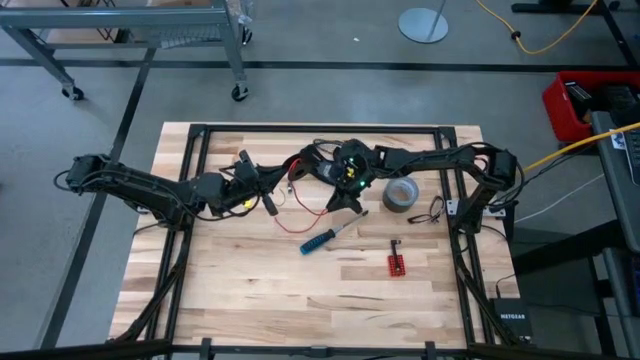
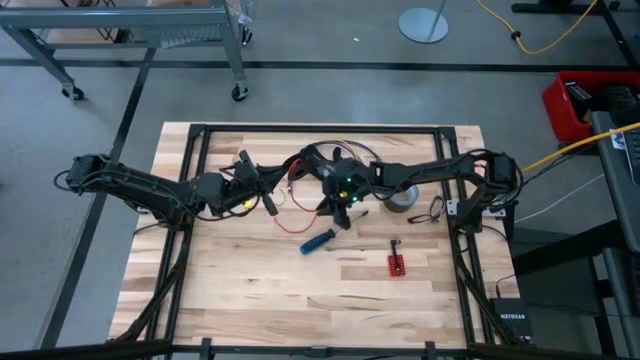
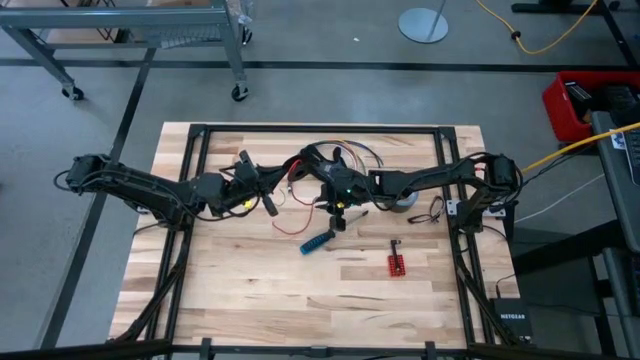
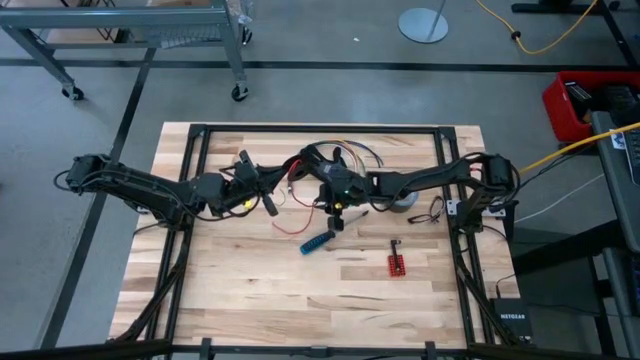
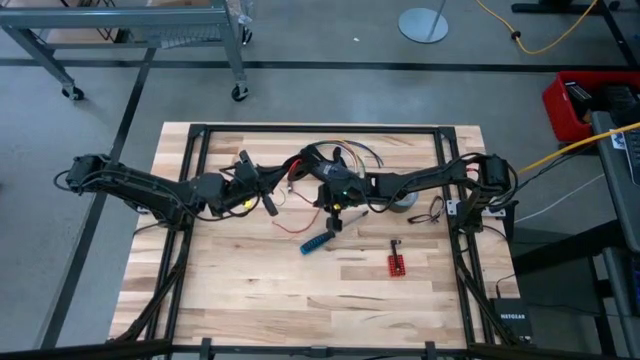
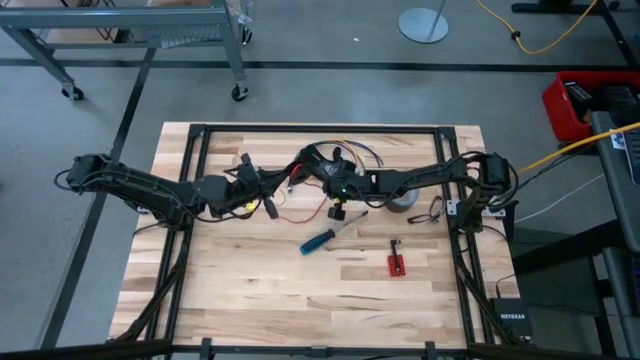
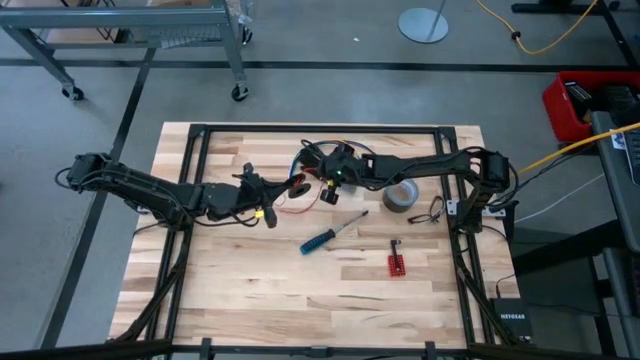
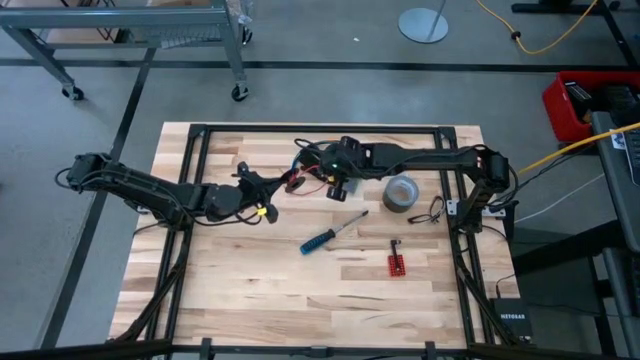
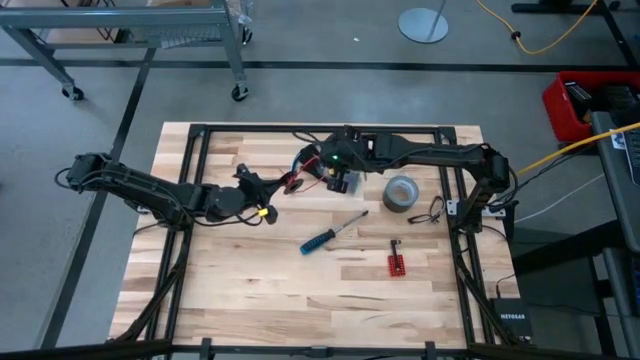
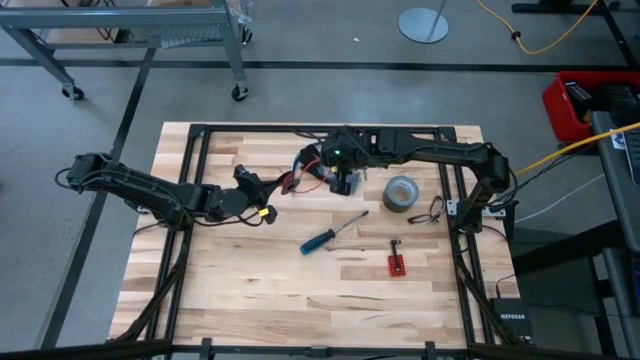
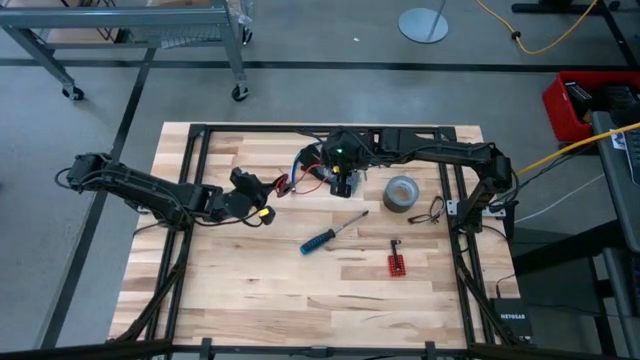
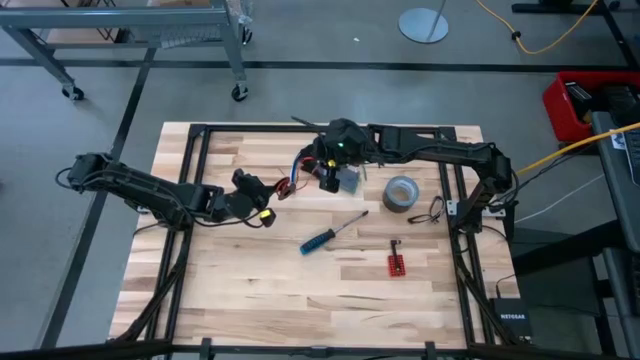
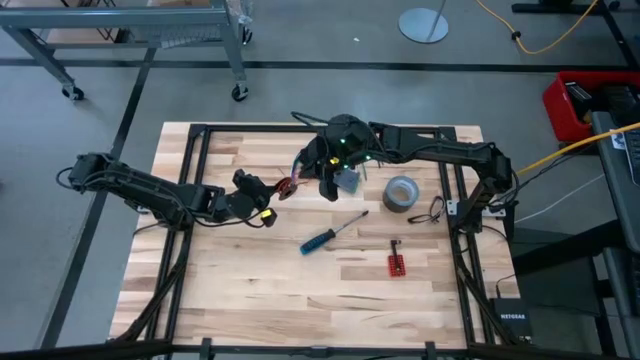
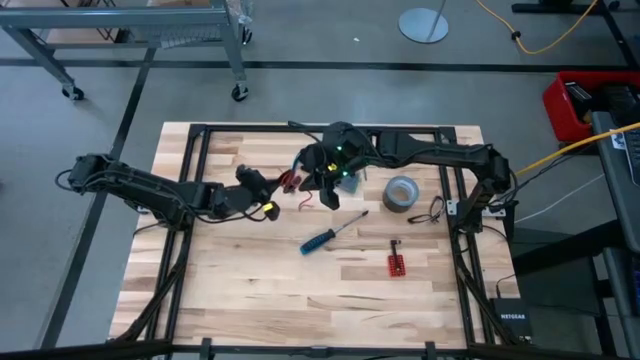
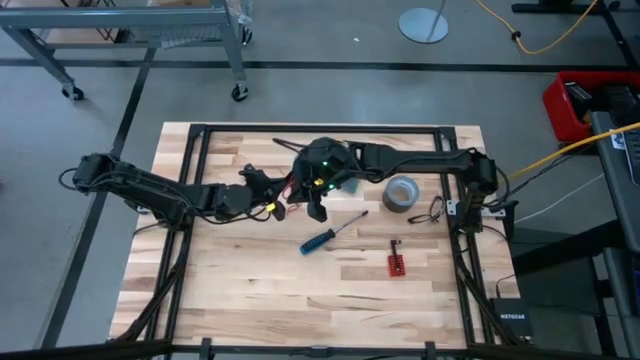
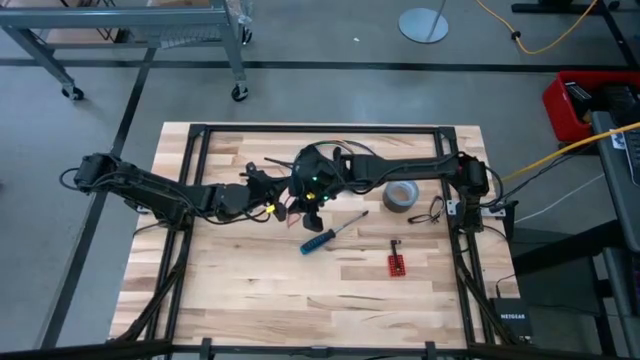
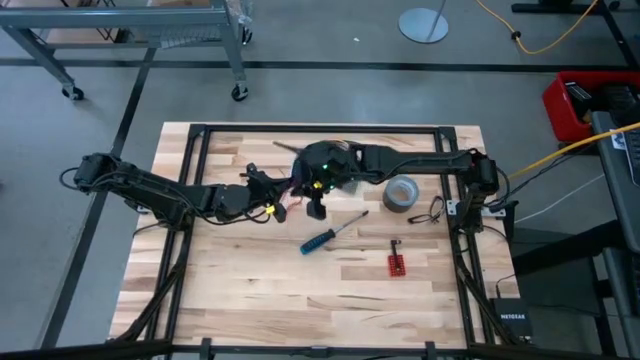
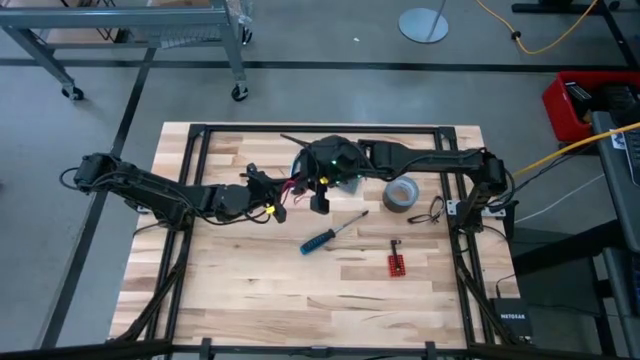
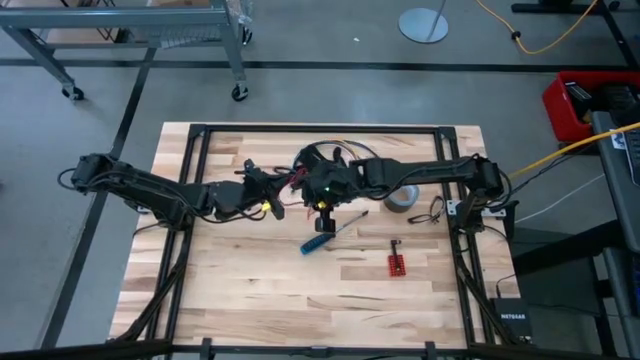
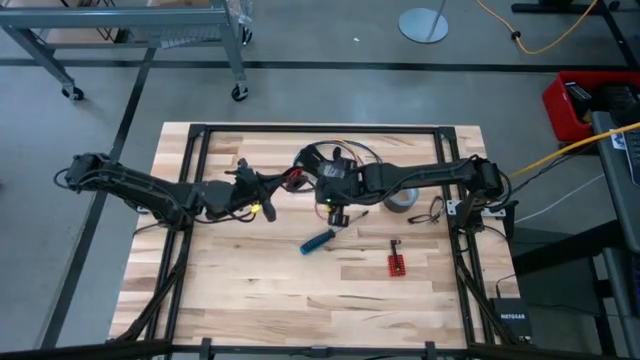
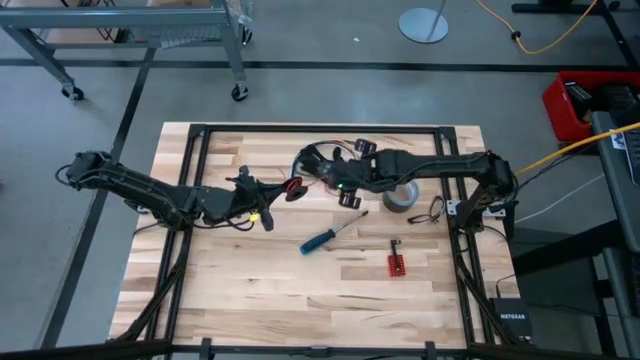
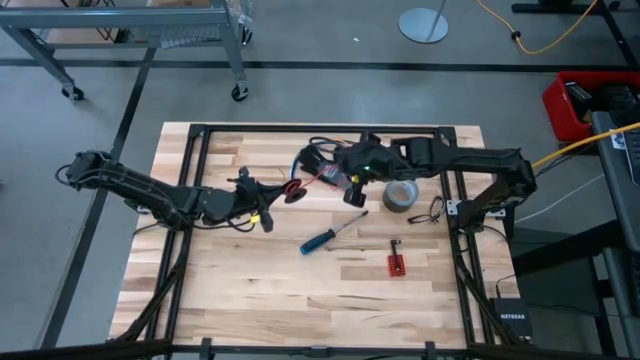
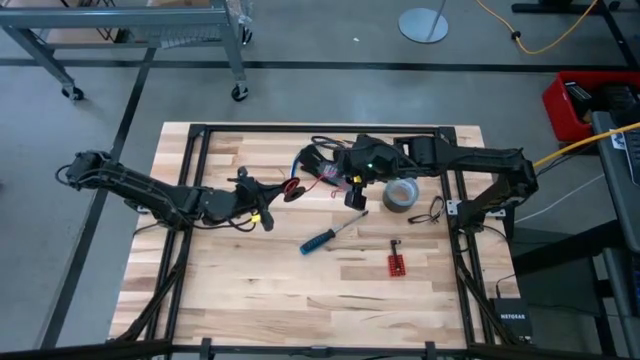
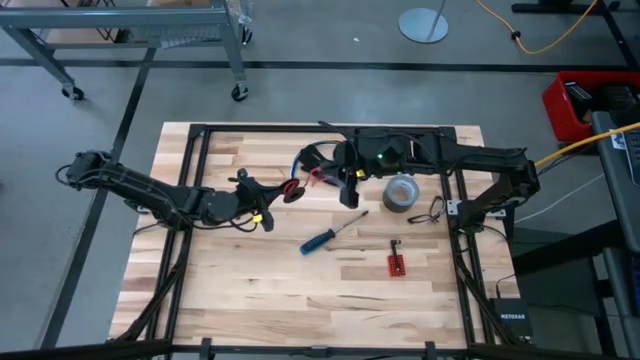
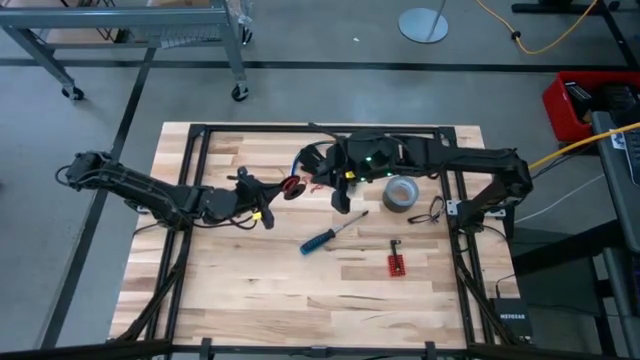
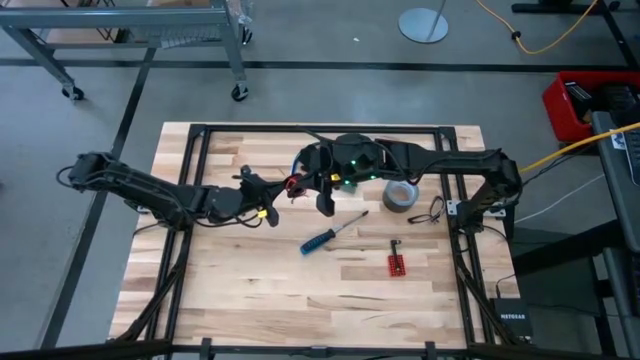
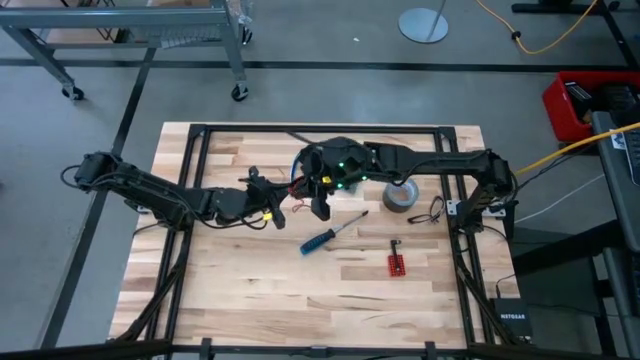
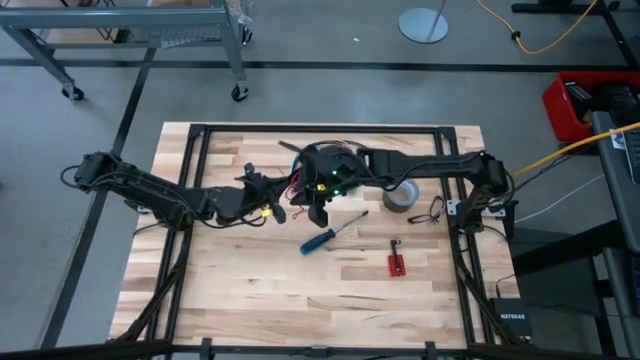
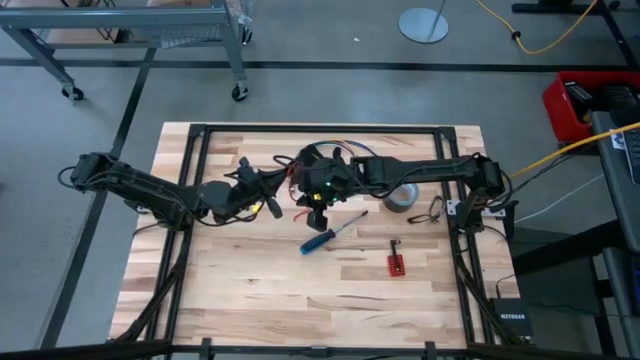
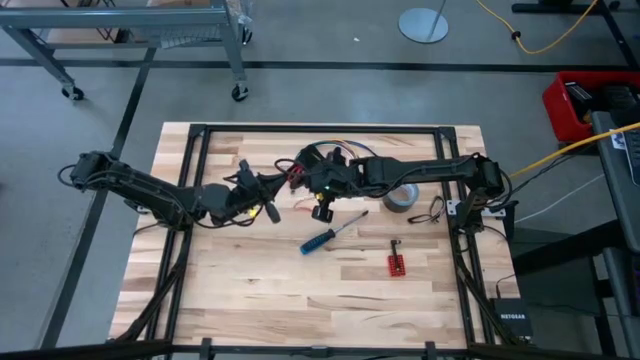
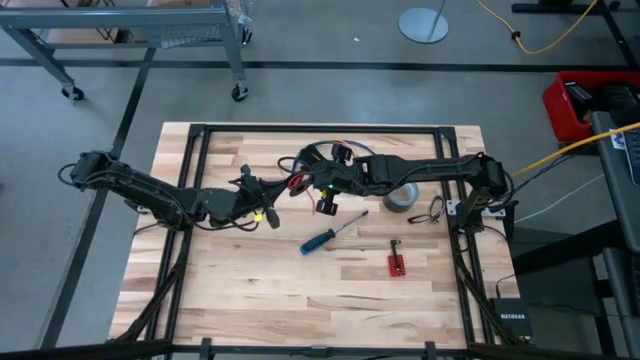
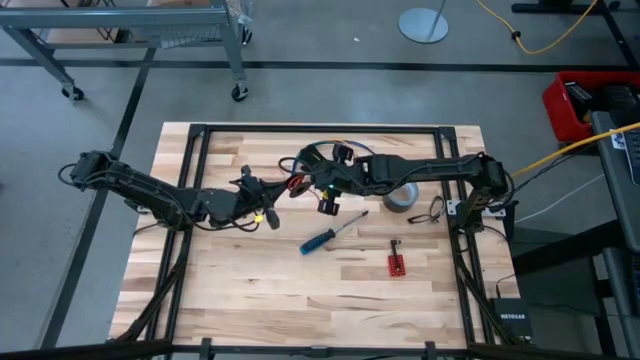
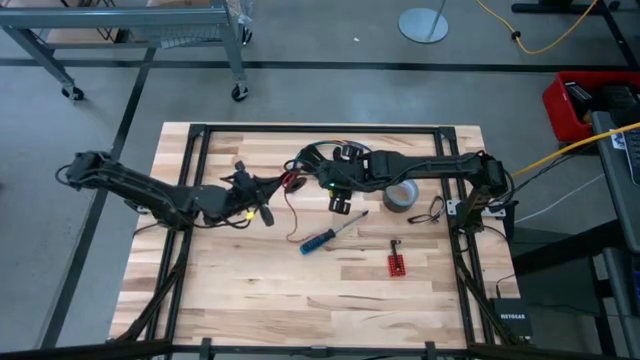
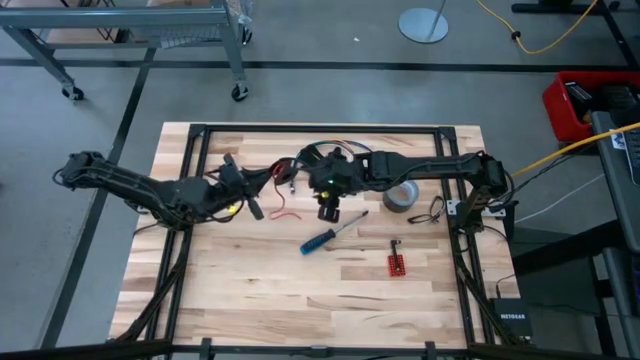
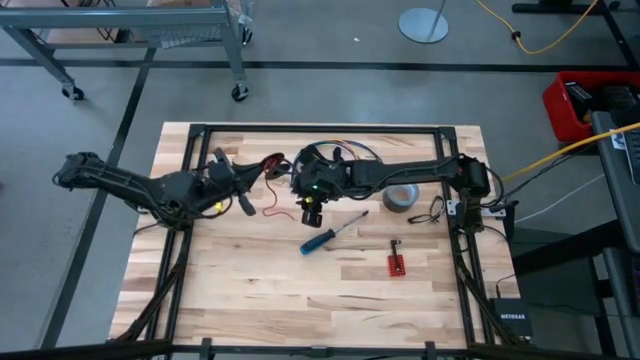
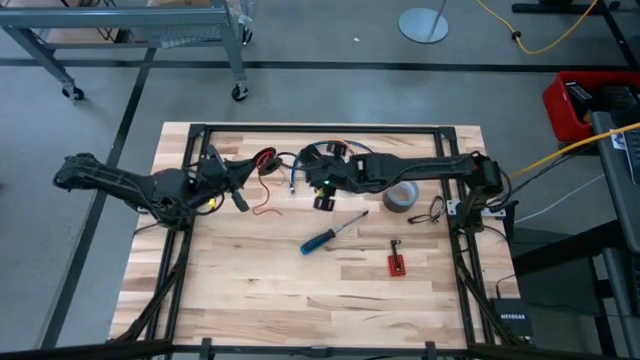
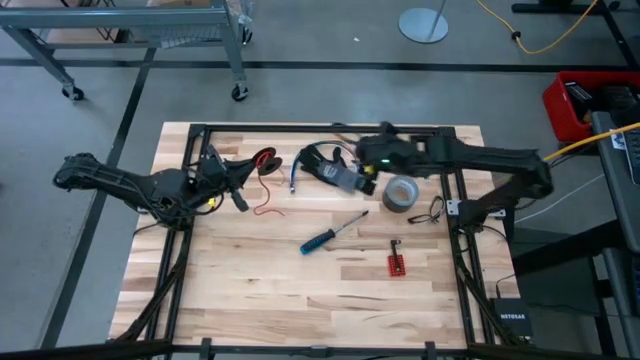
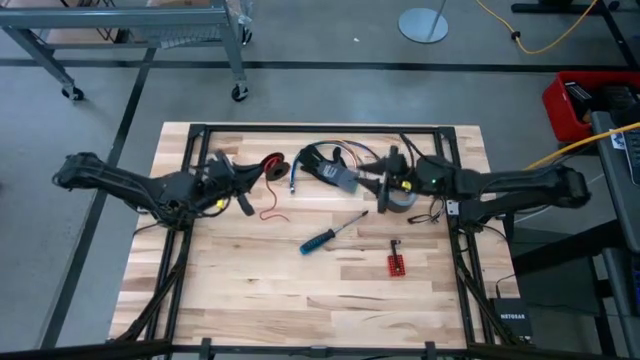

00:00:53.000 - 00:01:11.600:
Task: Coil cords
Coil the red wire onto the spool

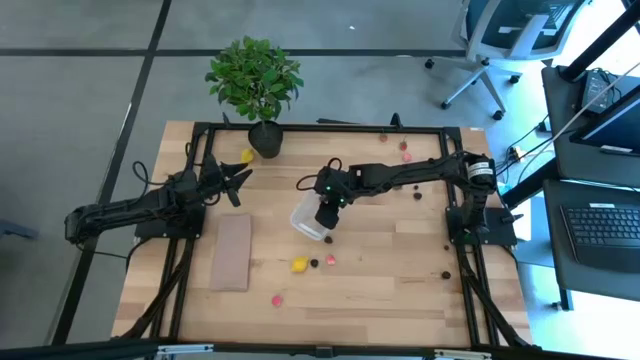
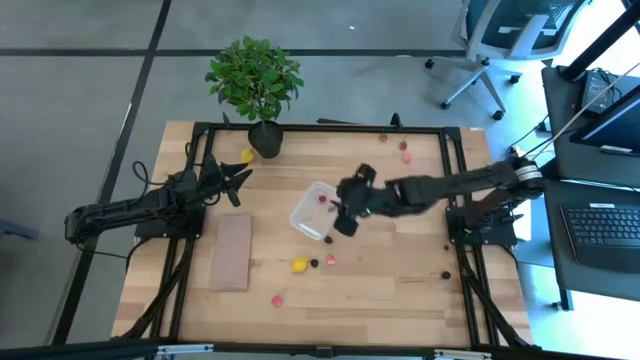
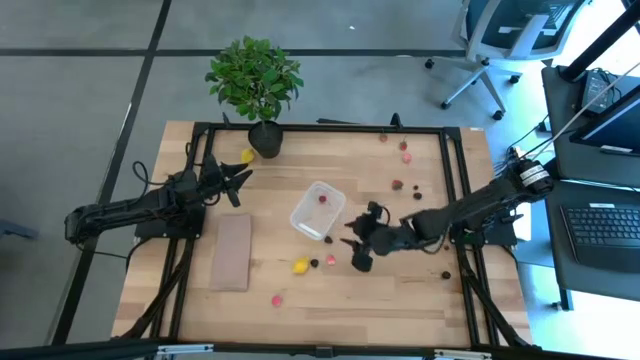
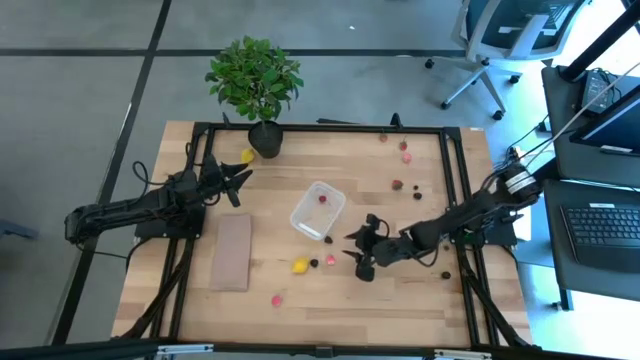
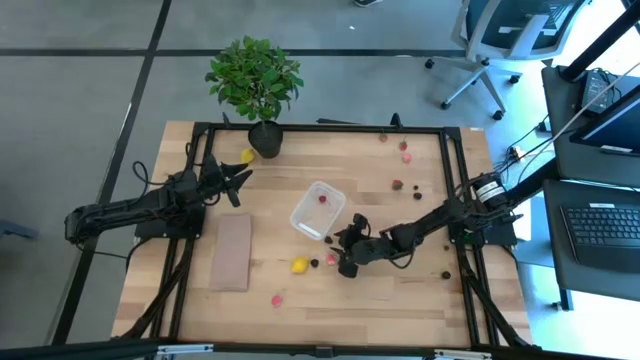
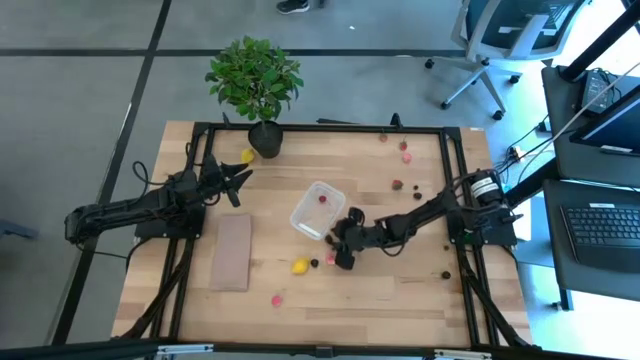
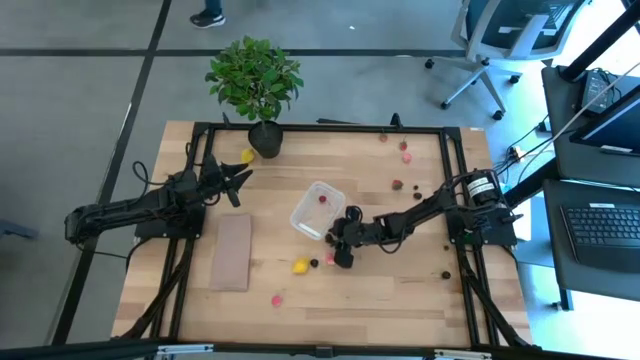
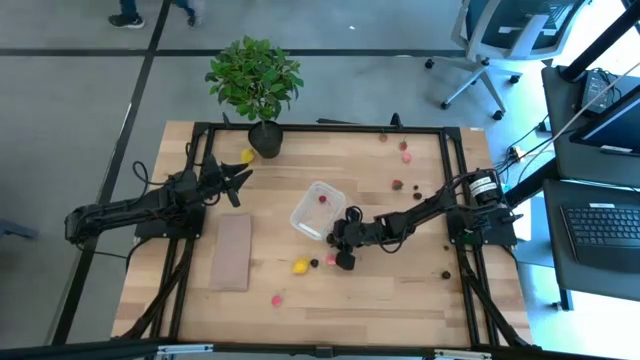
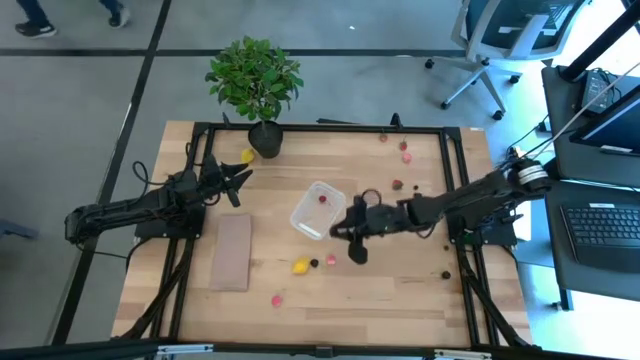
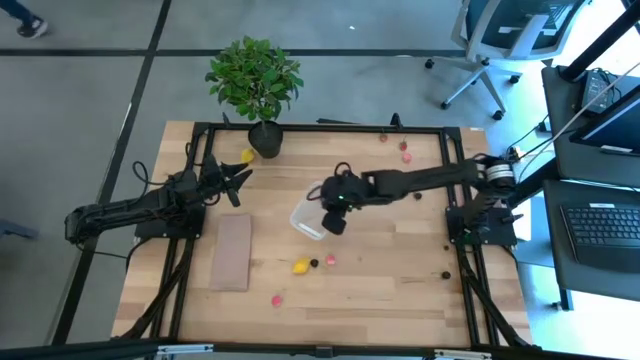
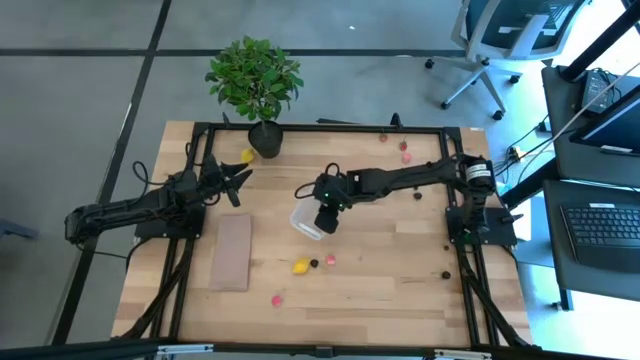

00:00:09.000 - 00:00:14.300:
Task: Pick and placing Produce into tupperware
Put the left blackberry into the transparent bin
